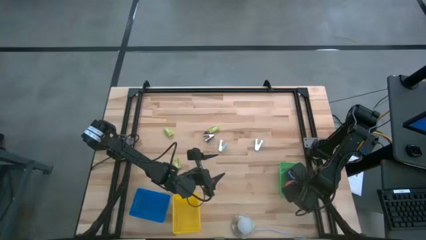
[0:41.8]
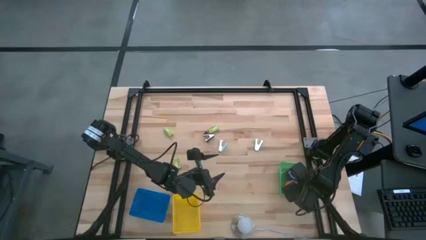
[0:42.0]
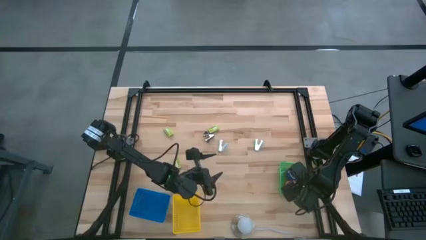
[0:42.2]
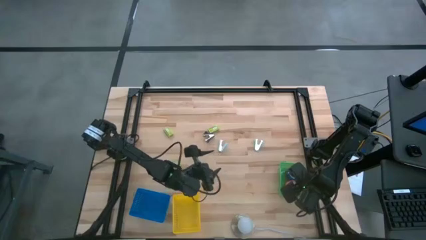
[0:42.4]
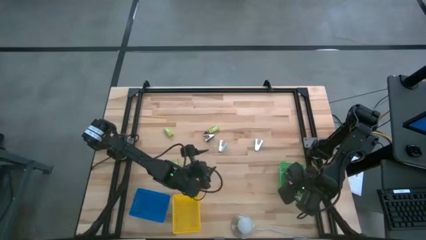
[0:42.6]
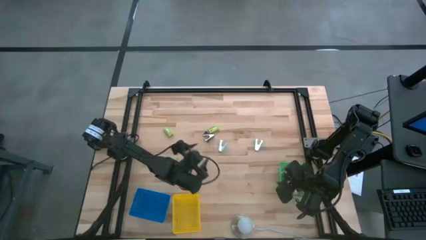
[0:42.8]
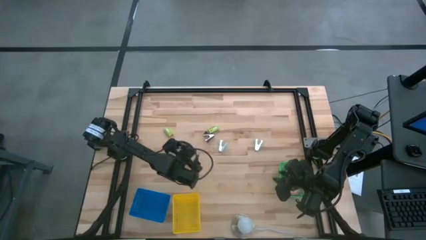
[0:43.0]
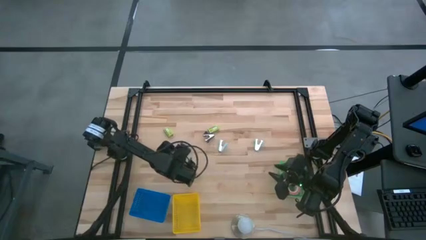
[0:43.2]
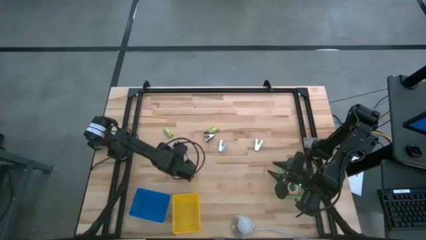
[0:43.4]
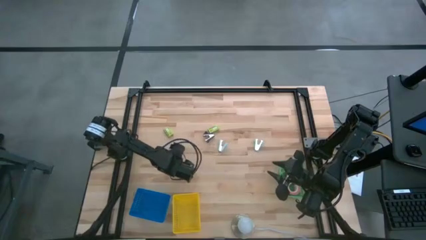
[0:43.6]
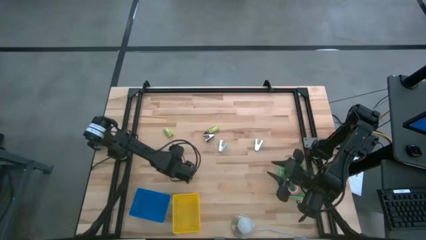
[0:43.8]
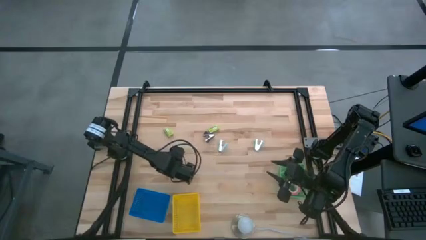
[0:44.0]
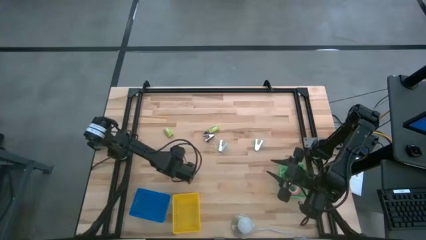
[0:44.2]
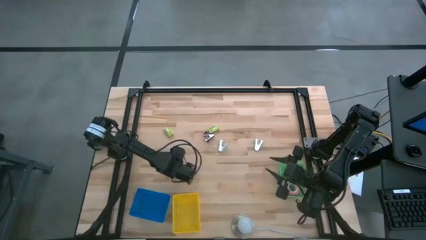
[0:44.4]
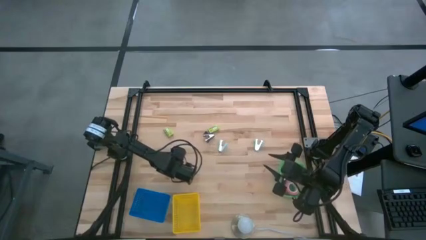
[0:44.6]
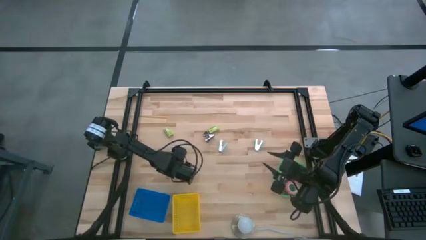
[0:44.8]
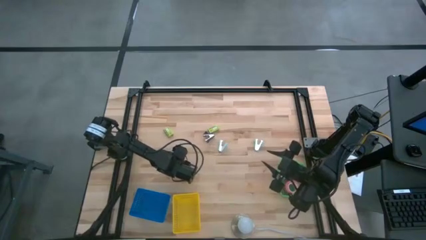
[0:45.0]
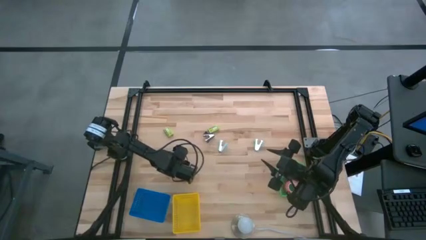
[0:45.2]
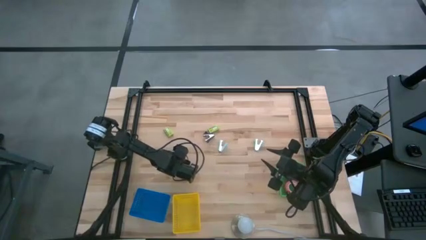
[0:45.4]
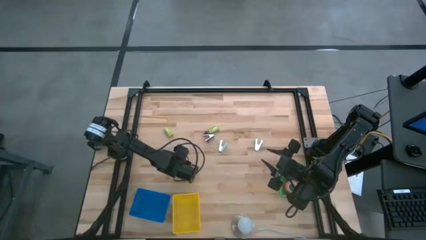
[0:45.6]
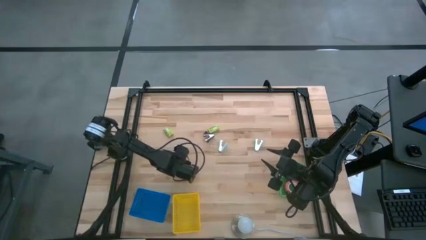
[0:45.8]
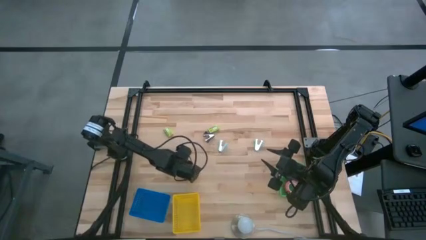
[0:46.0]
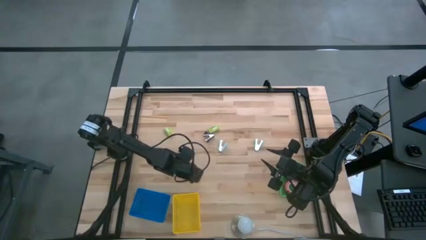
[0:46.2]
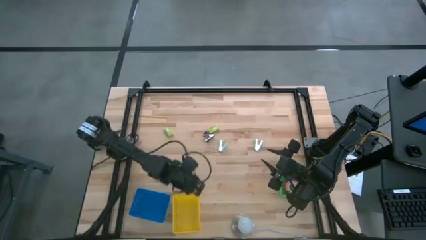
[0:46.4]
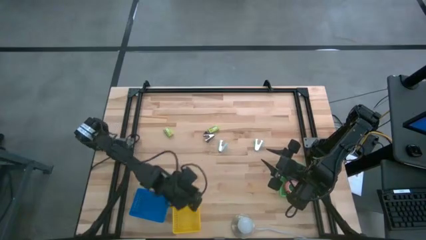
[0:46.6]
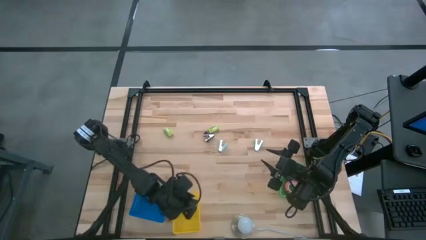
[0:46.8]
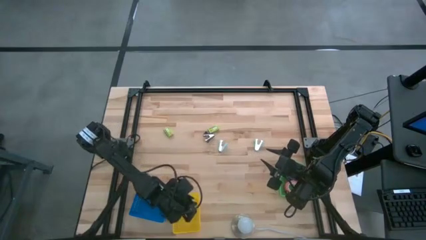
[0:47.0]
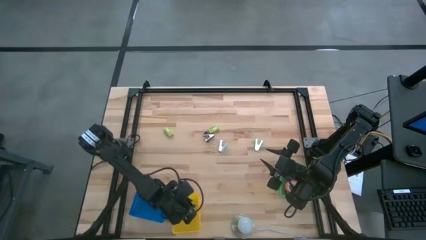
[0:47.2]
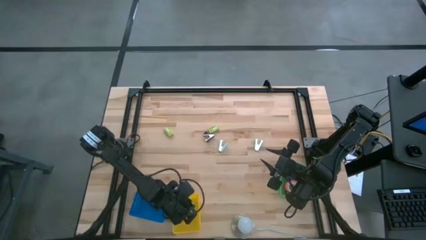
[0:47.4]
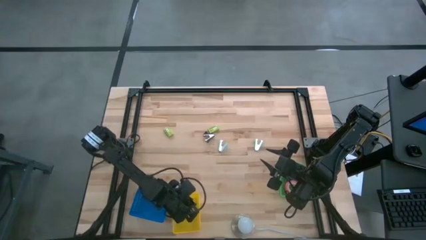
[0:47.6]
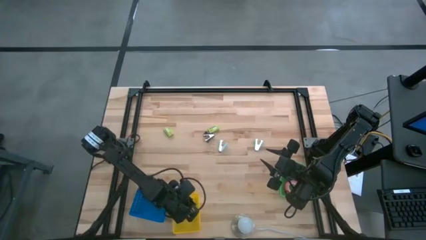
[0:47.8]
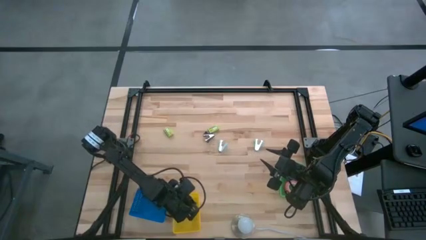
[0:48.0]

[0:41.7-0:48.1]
Task: Pick and place Stapler, Stapler remover, tape
Put the bottom green staple pin box into the yellow basket

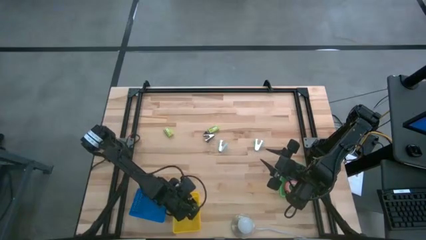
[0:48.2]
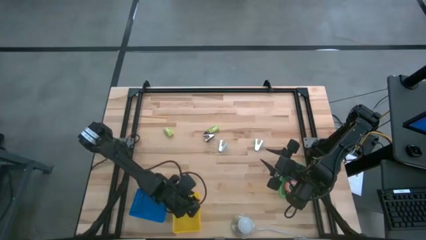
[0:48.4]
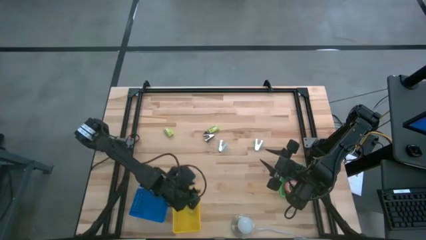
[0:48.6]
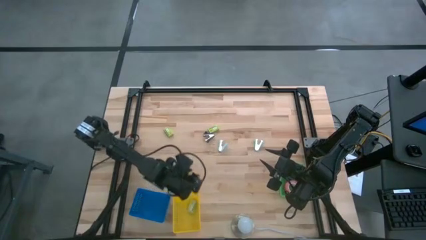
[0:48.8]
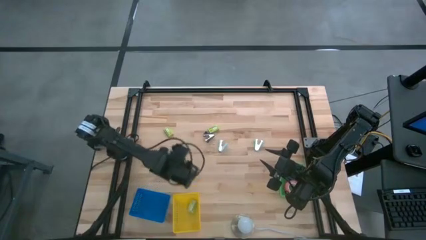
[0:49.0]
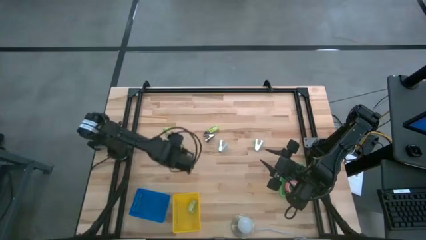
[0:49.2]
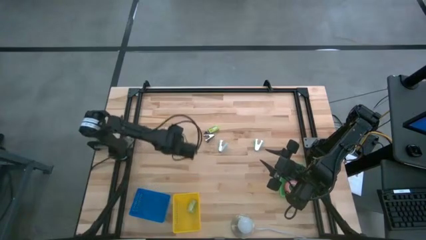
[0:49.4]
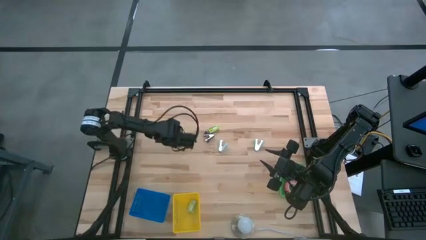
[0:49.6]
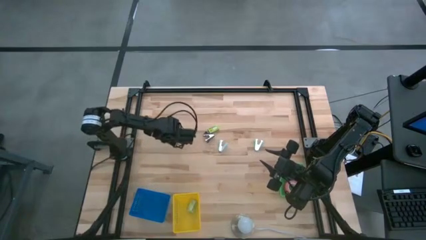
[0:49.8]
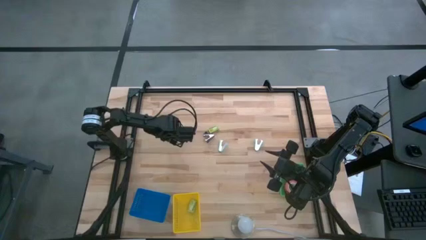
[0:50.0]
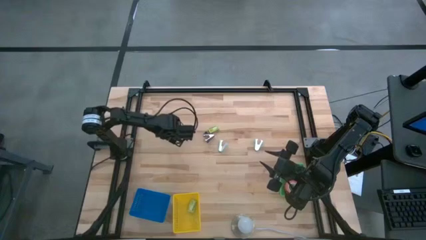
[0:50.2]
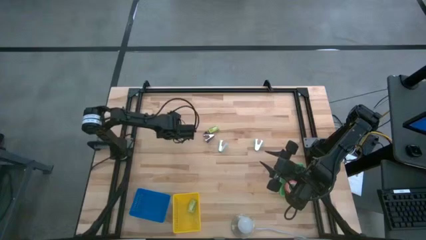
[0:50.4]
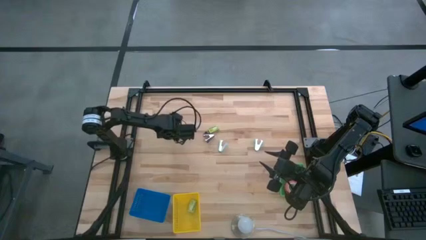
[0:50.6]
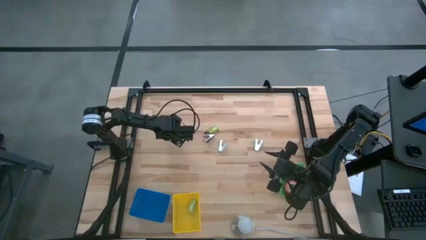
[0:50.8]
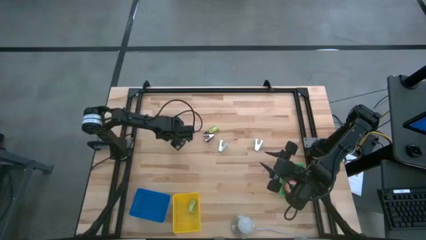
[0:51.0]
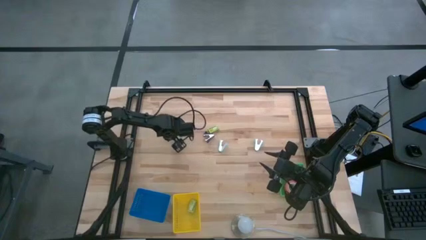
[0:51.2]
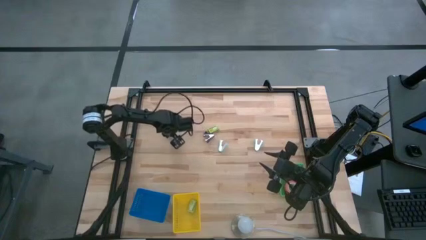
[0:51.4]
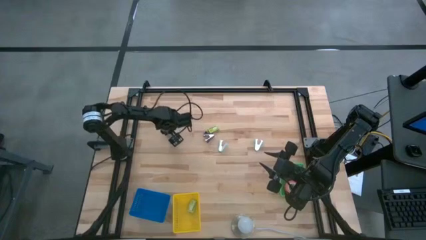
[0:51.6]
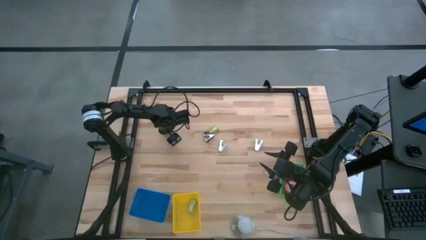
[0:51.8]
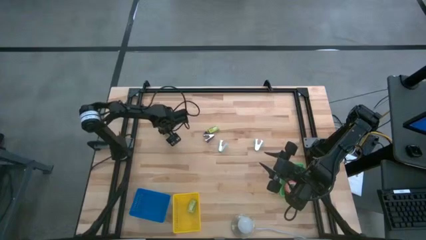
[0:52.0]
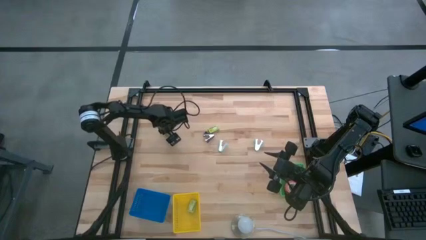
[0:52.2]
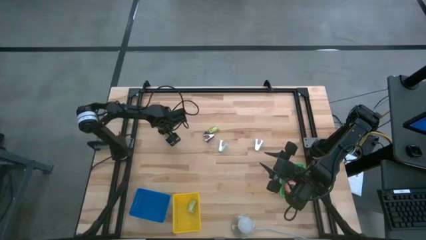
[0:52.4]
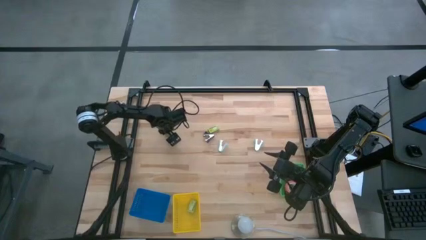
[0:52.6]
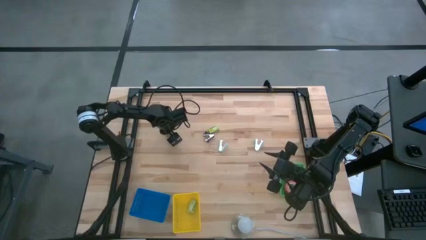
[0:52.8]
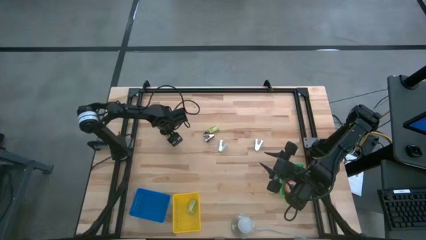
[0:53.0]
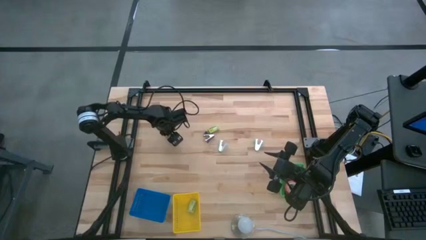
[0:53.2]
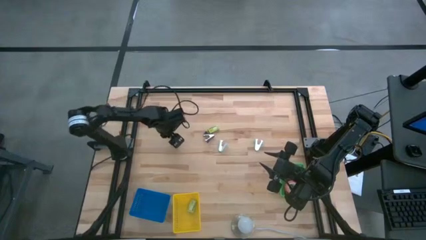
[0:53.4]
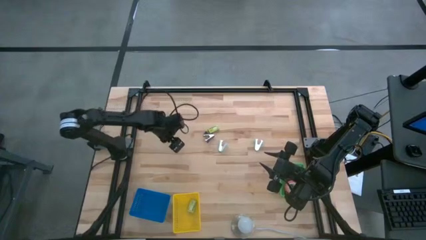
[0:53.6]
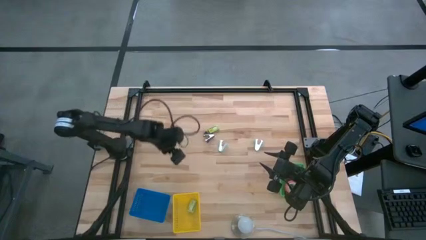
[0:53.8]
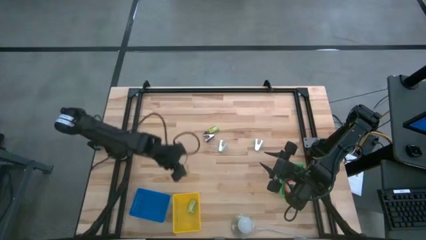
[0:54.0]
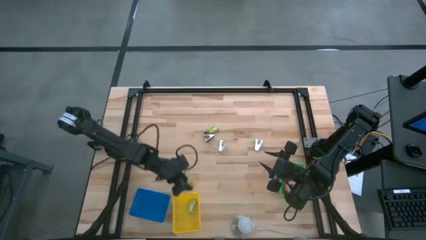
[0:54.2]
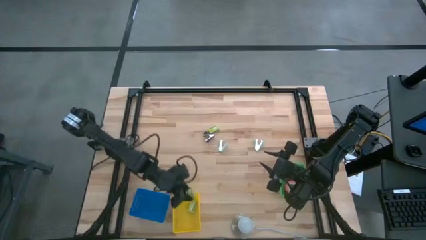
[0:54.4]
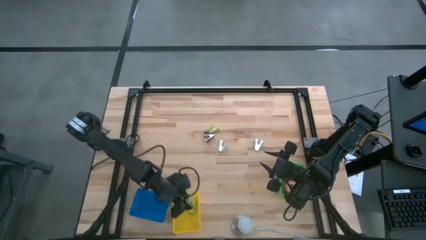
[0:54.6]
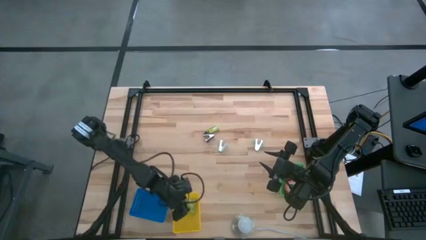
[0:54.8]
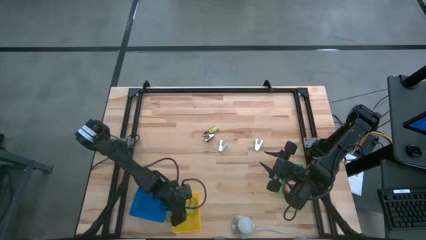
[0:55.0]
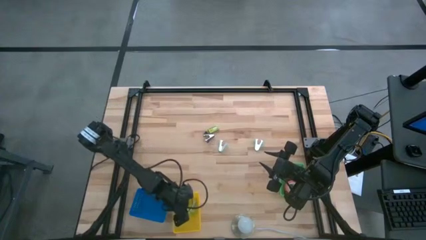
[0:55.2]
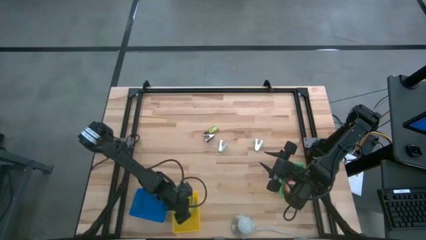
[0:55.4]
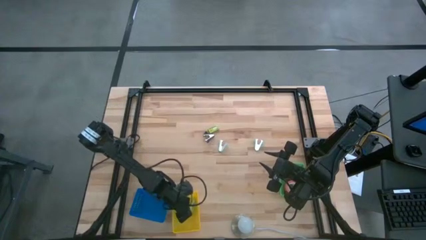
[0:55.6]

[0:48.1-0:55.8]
Put the left green staple pin box into the yellow basket
